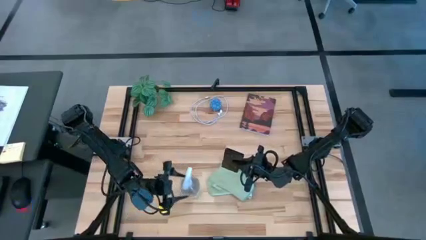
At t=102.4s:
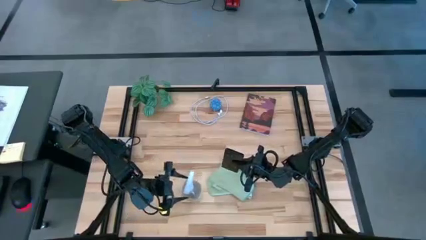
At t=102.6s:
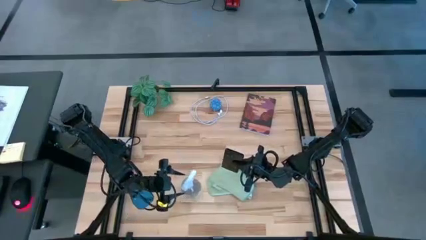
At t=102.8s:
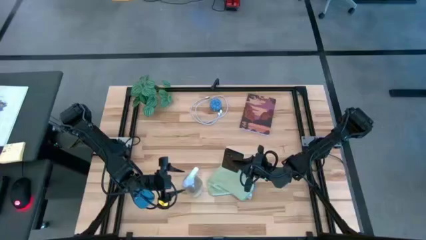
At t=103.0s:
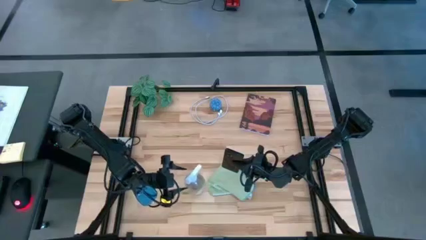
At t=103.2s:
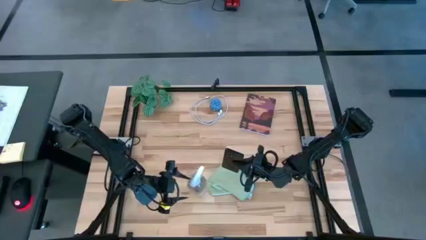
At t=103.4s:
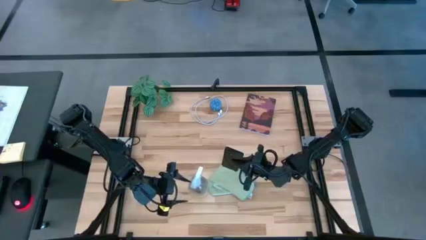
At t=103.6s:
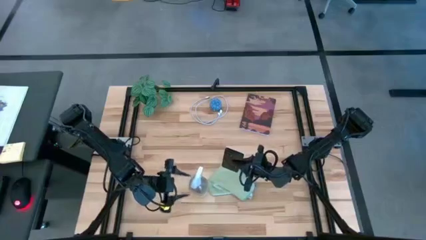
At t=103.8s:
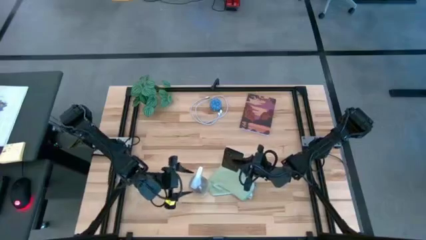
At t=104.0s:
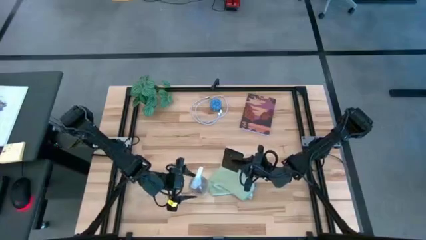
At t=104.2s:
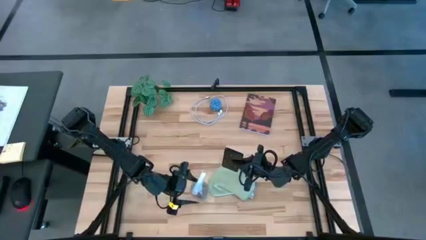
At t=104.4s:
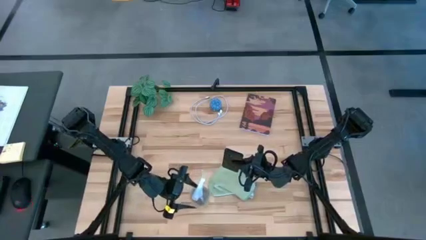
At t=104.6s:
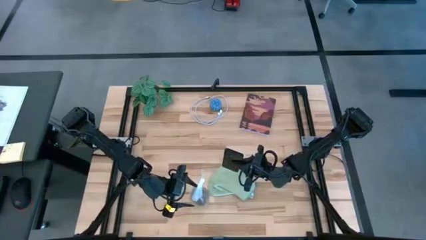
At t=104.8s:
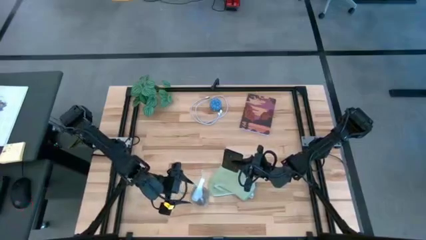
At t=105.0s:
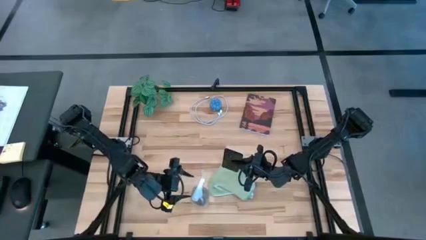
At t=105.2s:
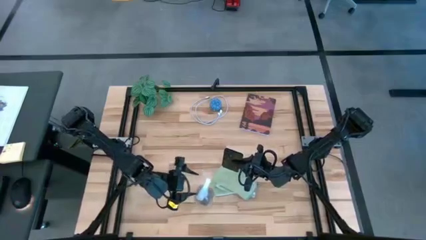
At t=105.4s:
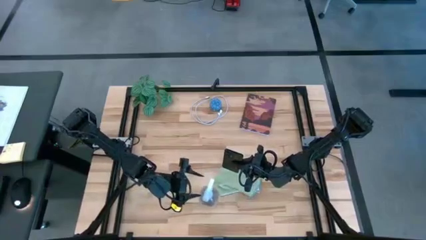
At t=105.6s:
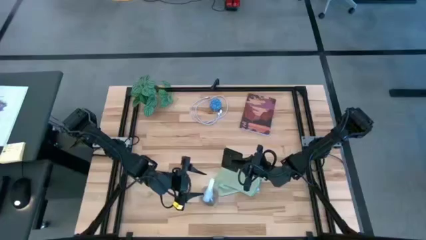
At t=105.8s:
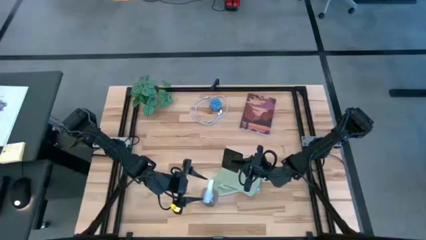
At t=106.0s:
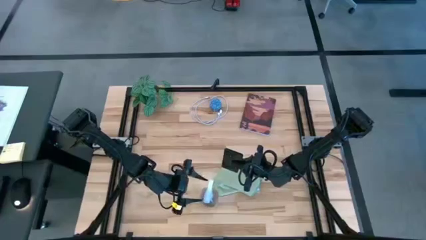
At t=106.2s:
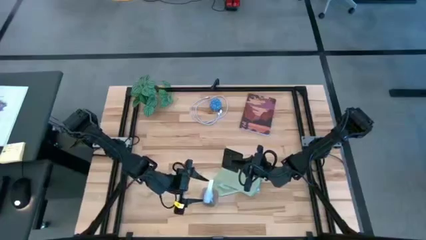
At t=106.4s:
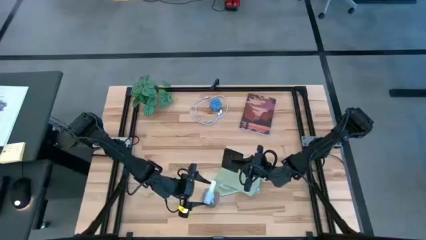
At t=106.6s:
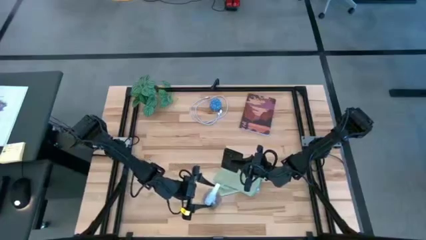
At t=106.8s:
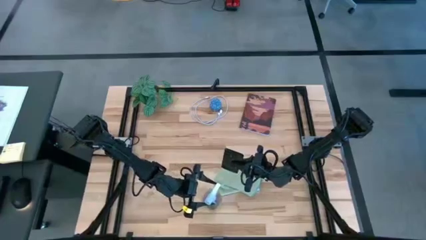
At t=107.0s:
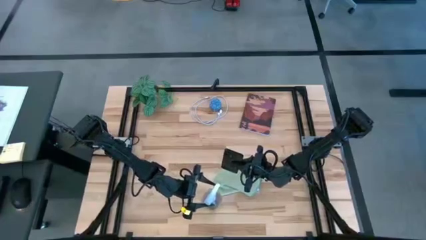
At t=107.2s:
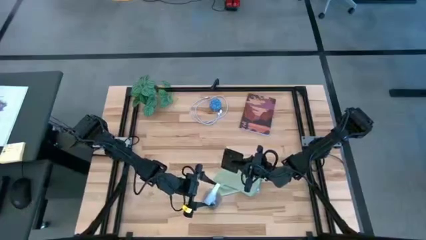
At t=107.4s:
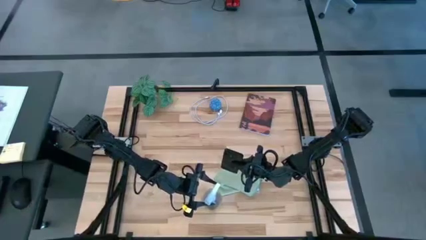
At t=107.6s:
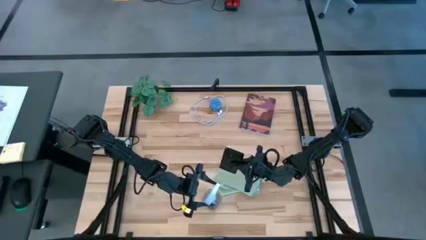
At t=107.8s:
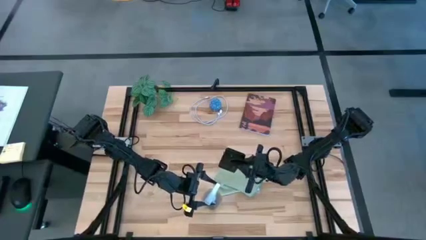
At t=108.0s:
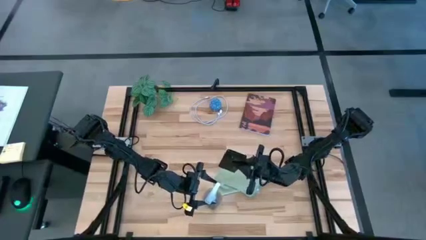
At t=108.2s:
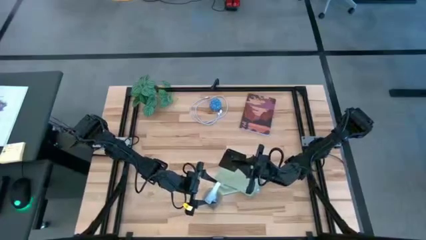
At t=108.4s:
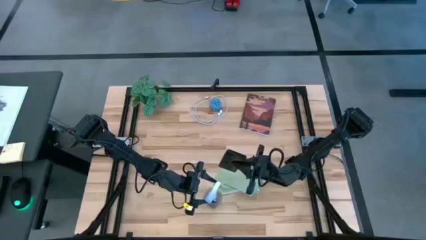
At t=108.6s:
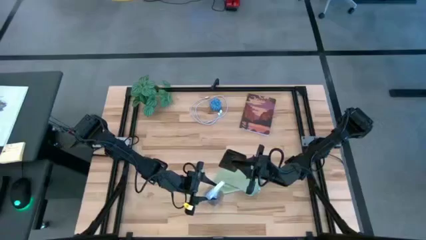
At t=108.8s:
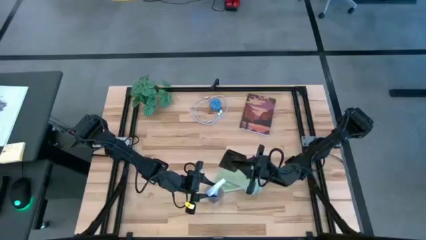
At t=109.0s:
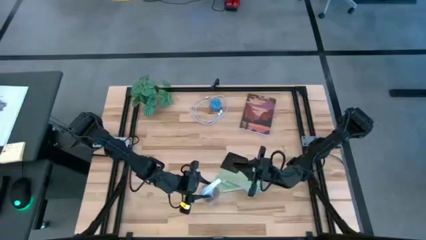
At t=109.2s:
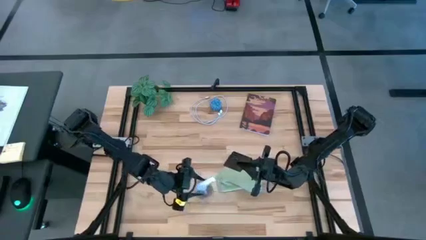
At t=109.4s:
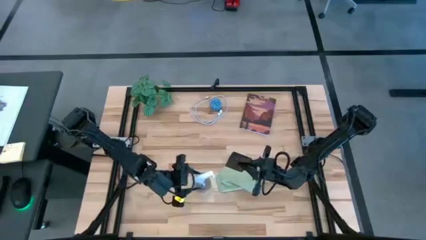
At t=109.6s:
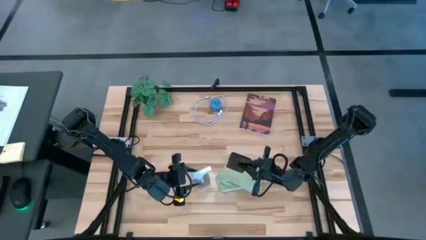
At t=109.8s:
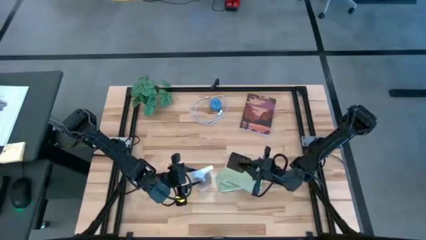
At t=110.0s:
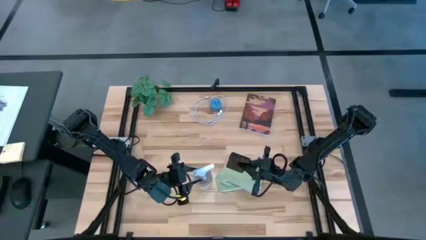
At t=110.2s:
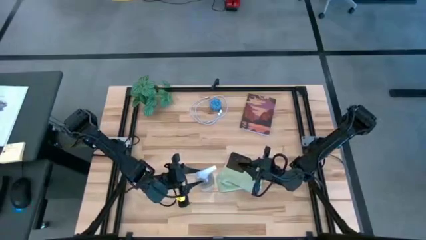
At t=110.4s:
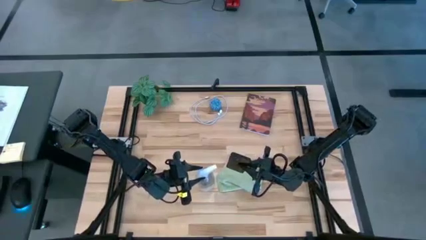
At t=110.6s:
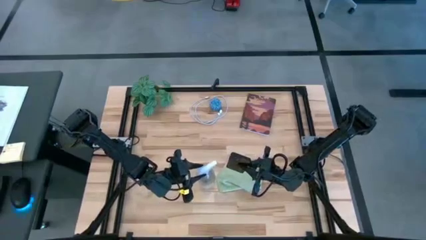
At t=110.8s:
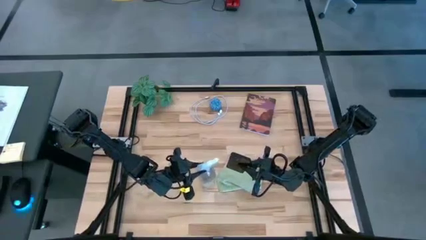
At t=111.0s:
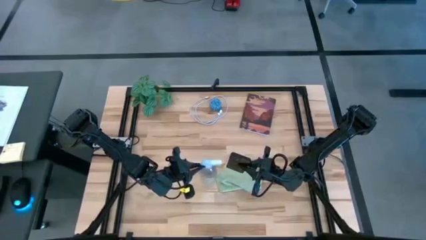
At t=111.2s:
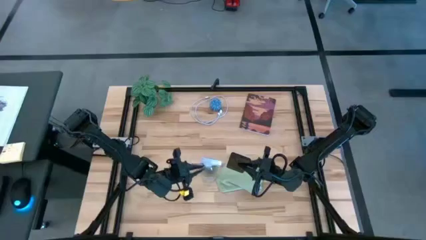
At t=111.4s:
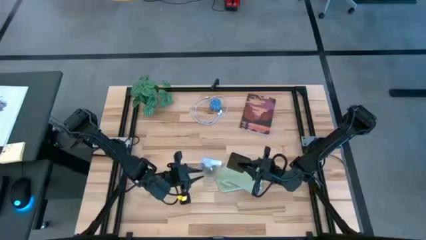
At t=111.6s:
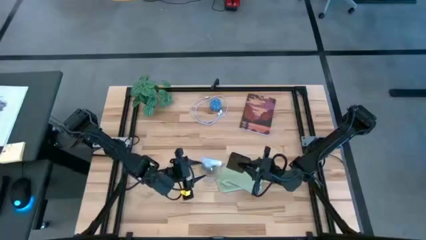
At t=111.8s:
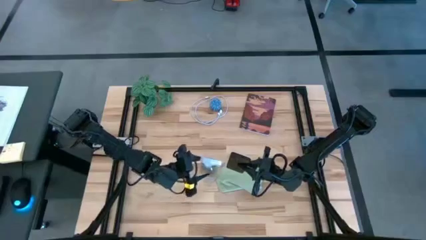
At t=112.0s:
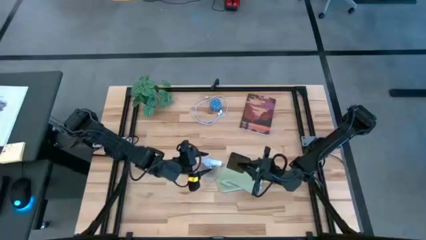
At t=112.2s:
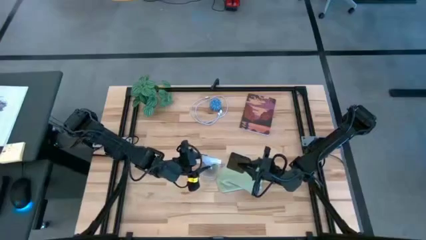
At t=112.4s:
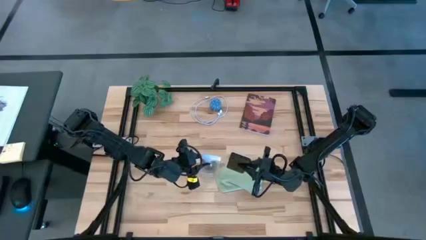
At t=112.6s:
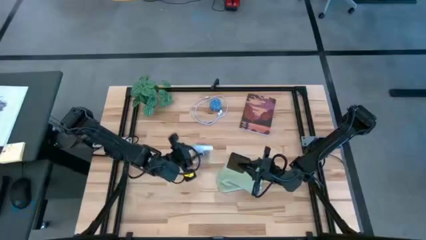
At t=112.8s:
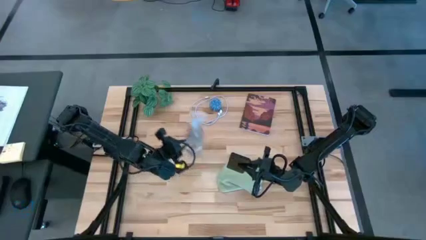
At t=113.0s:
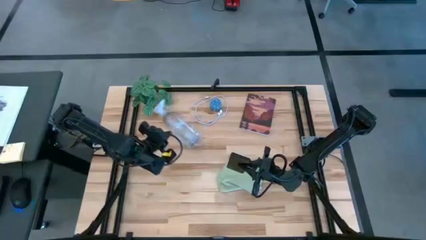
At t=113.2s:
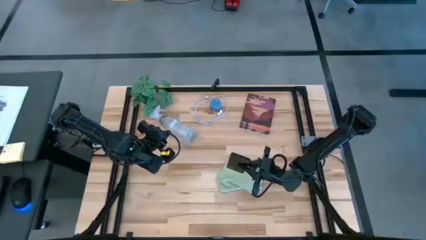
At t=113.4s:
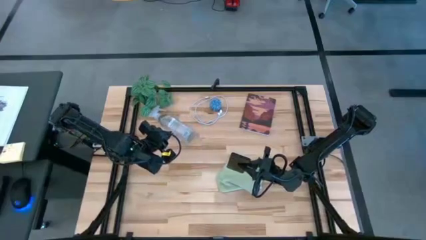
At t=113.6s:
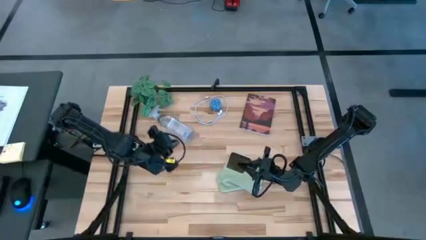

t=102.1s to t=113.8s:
Task: Apply microfiber cloth
Spray the back of the black cellphone with the spray bottle

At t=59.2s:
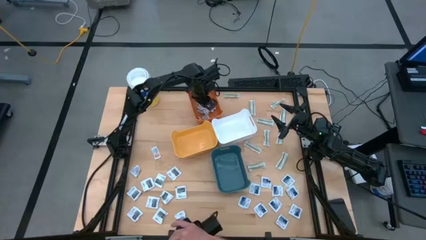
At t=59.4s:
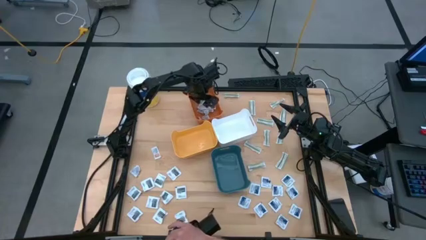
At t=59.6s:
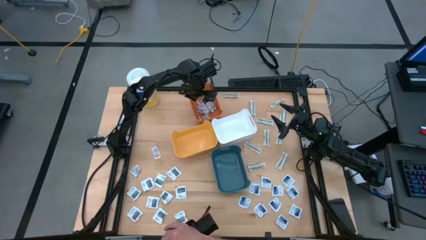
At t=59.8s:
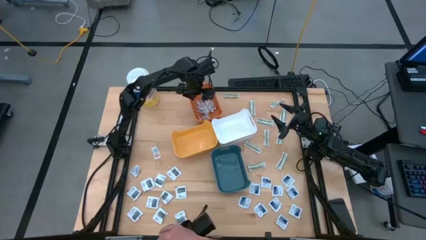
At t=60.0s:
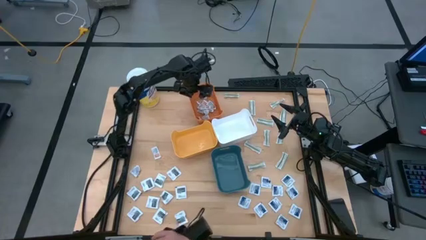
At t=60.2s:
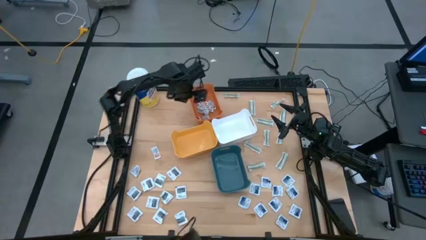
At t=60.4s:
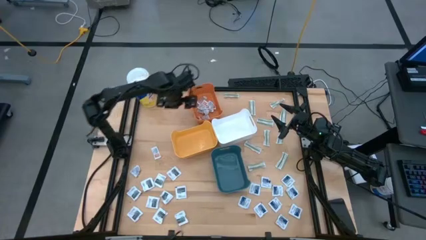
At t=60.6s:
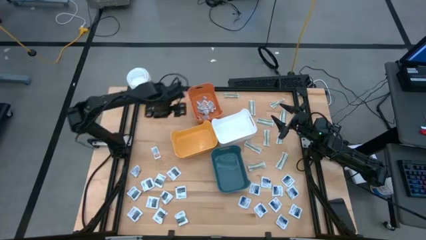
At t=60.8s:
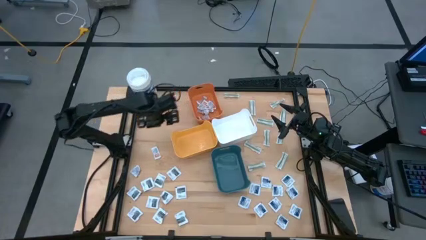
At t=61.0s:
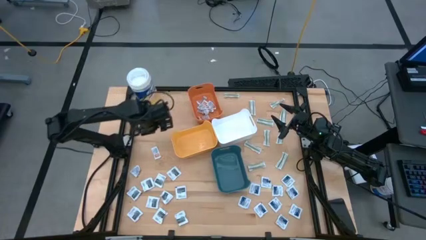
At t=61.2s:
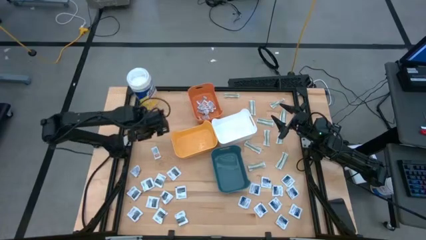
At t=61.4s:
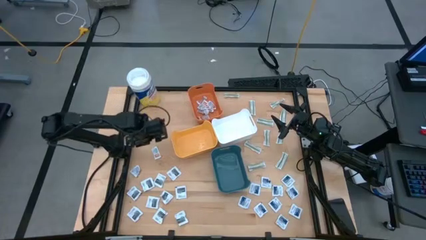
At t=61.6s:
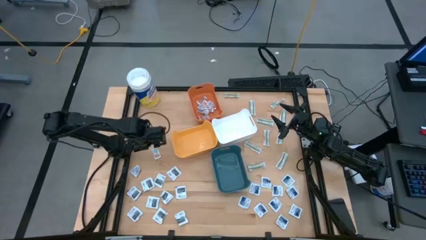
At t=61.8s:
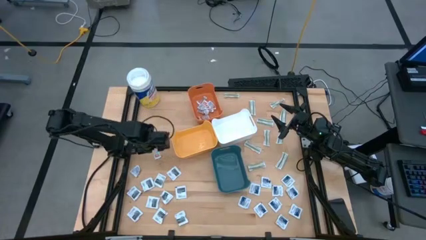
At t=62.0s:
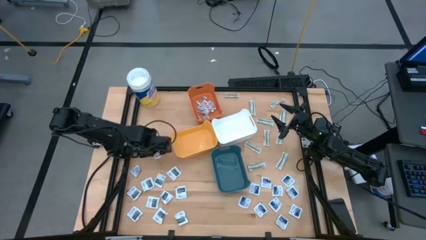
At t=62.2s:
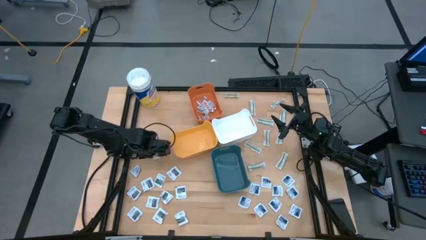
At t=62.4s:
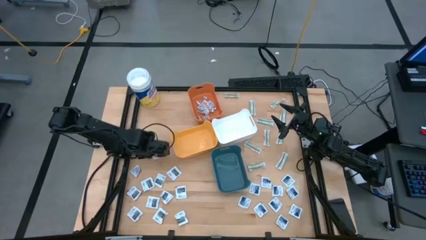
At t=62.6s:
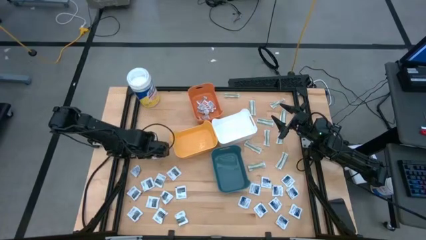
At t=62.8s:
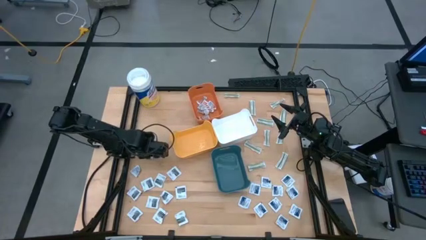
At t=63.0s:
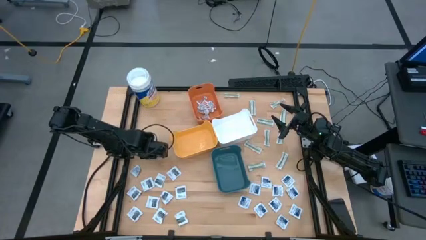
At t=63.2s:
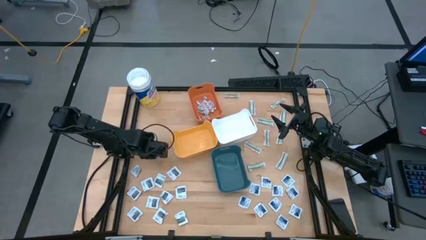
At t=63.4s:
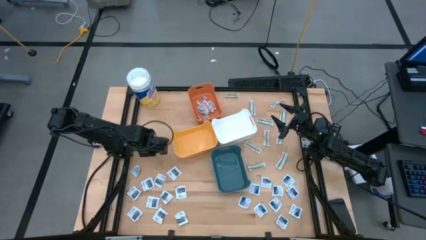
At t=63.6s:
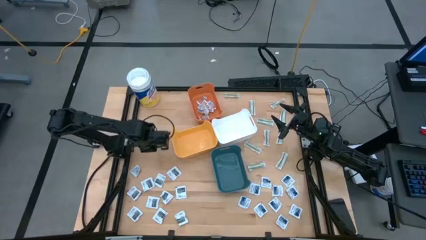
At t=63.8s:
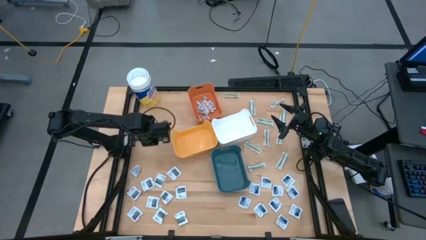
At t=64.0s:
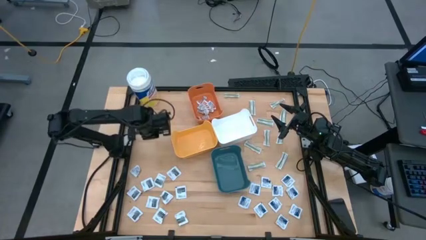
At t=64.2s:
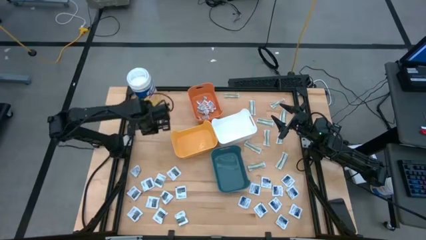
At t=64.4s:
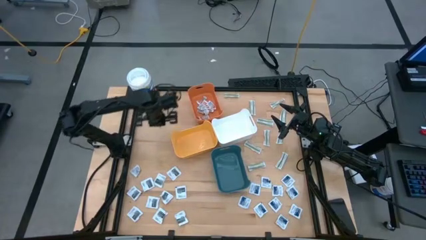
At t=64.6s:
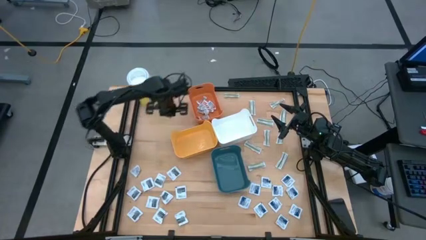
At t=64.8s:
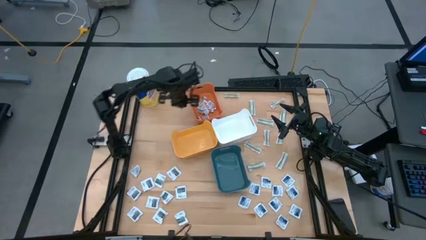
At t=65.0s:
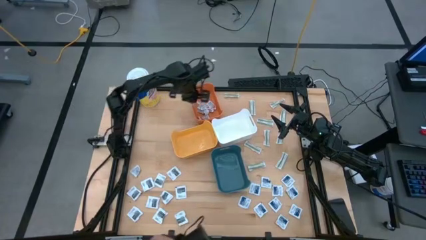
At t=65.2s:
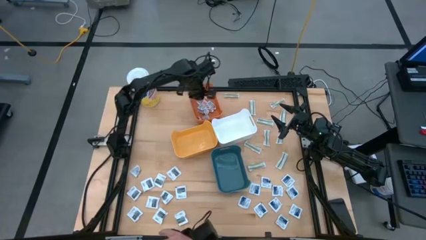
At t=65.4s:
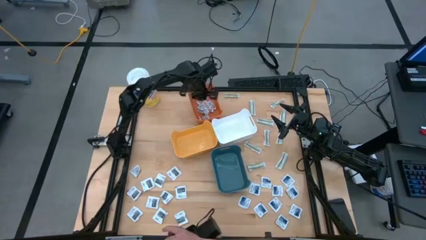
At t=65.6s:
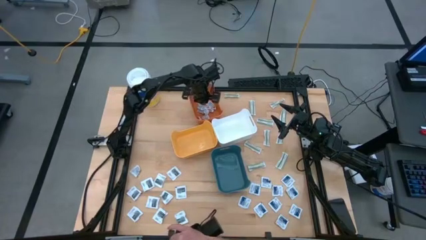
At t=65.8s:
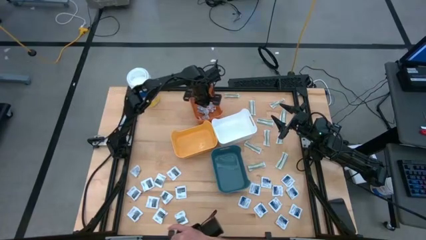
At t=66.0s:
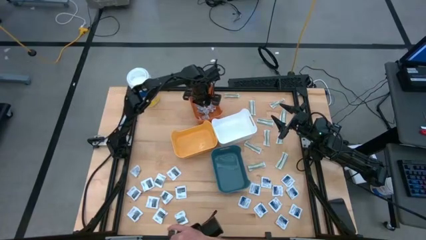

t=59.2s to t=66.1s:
Task: Pick & Place First Aid Supplies
Put the orange ointment pack into the orange bin
